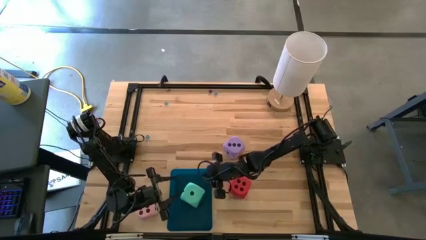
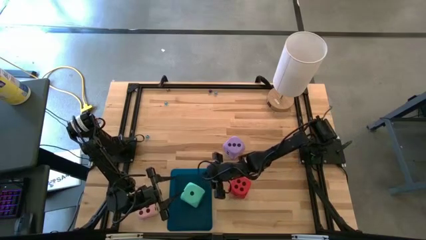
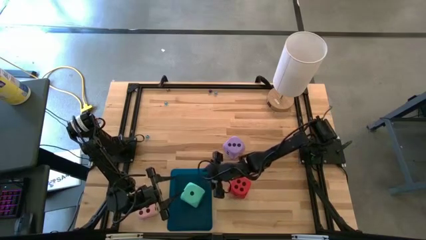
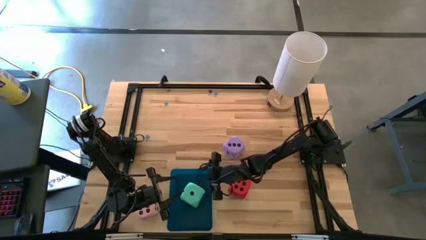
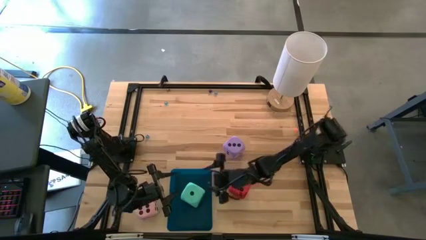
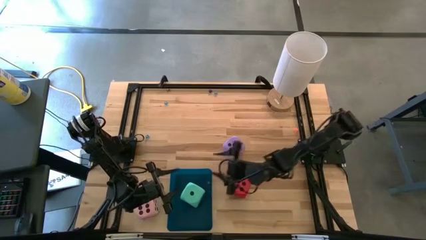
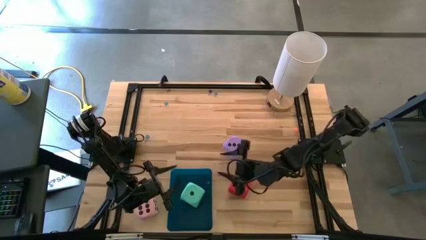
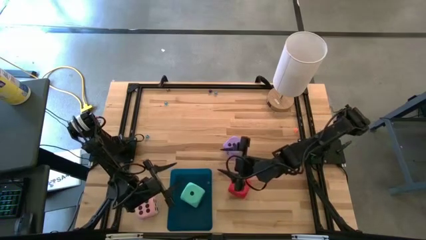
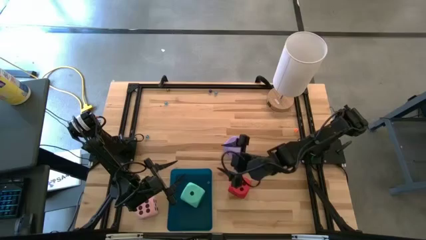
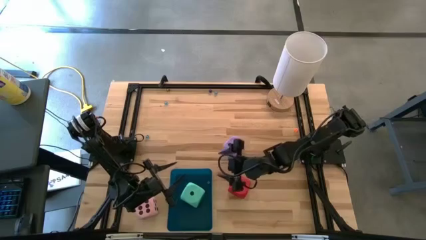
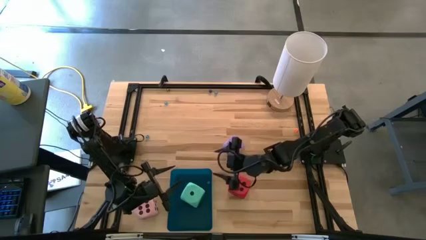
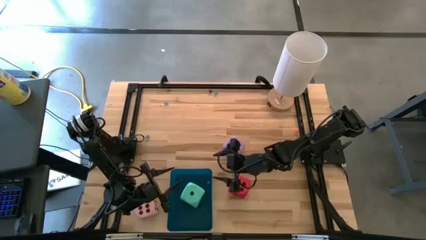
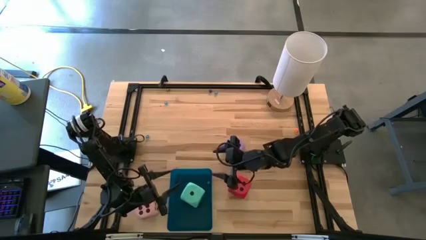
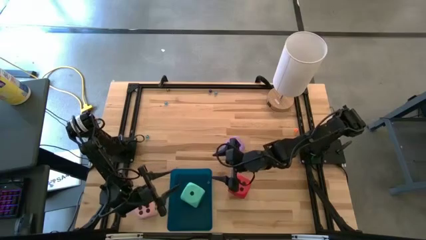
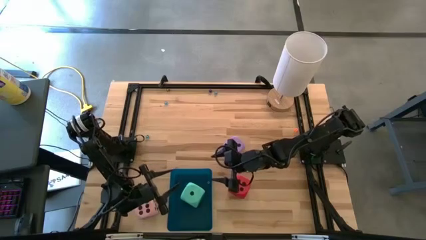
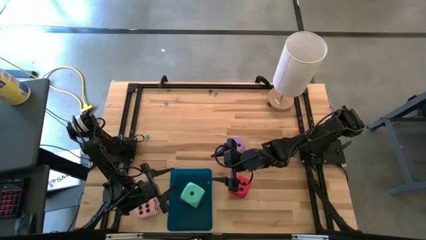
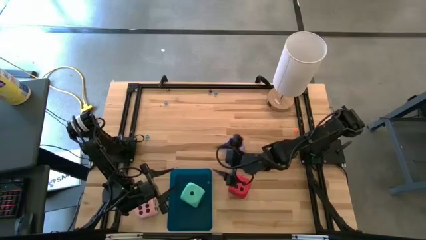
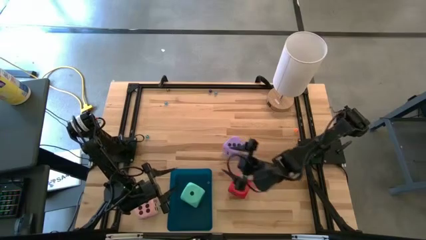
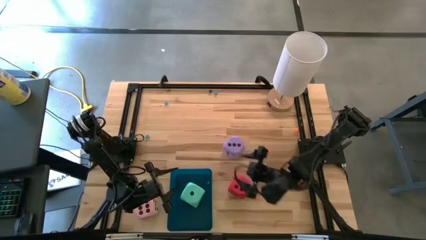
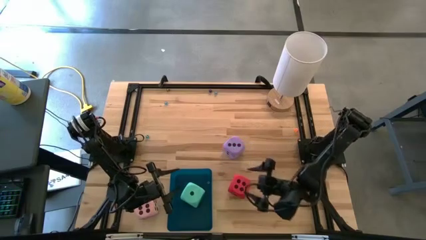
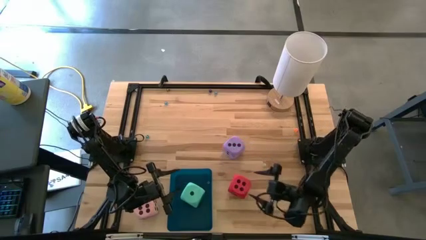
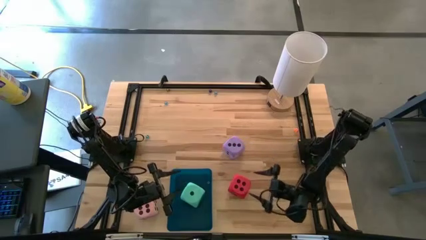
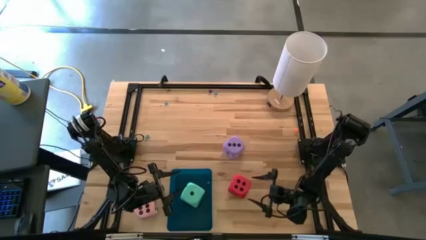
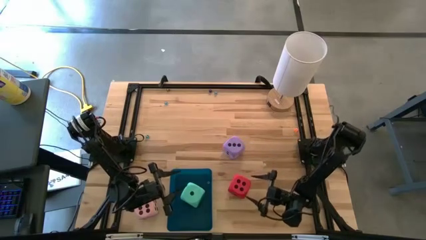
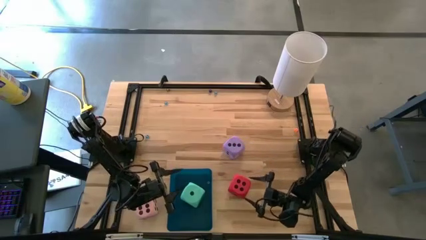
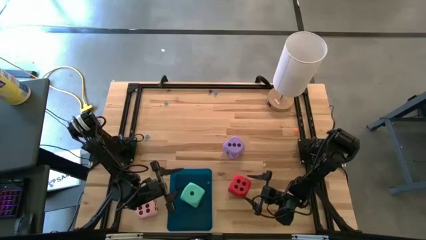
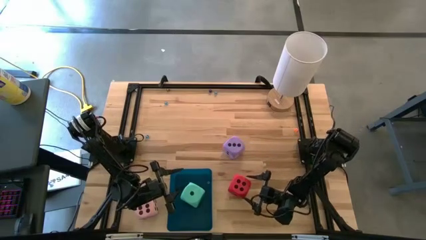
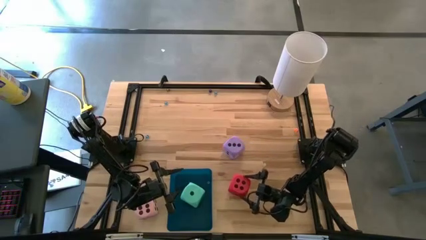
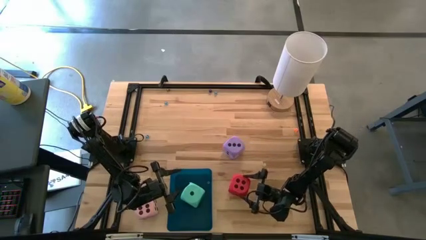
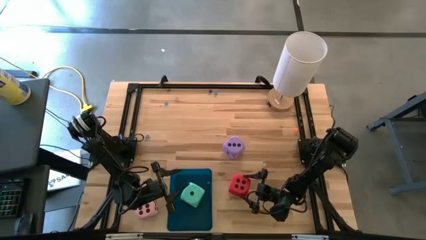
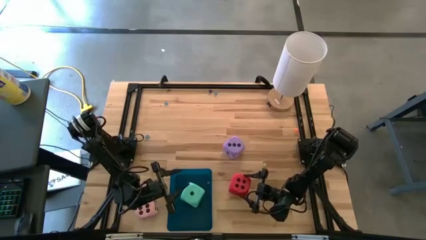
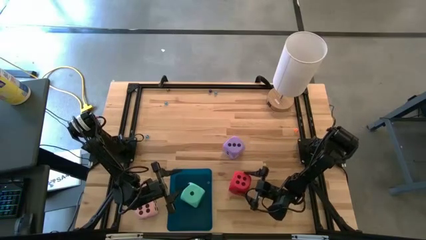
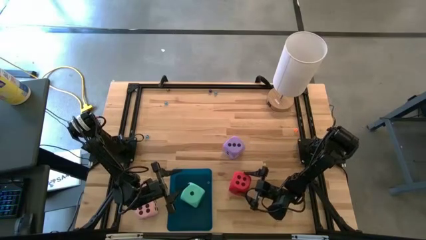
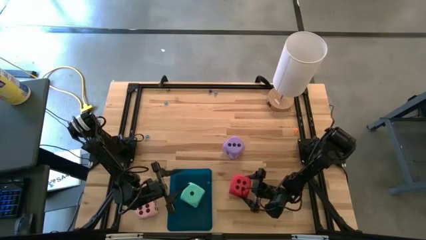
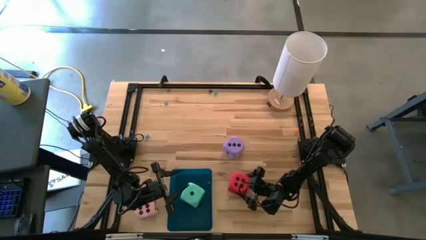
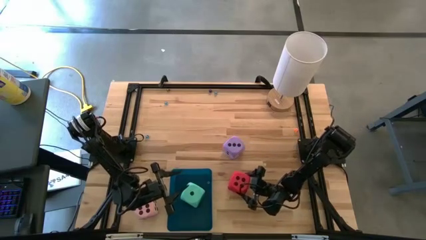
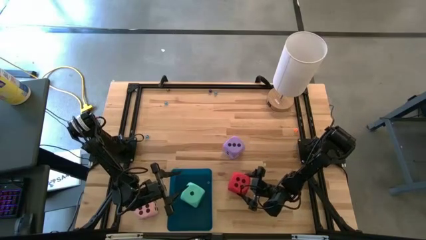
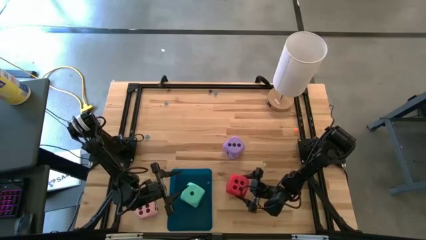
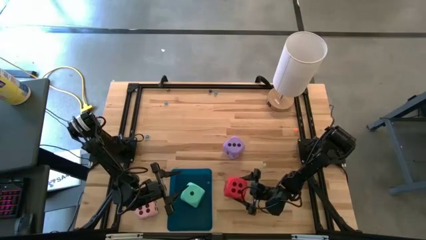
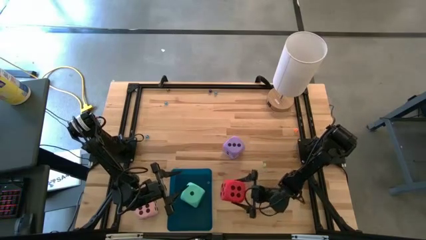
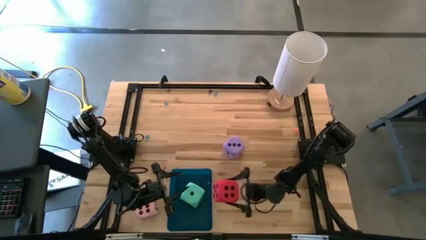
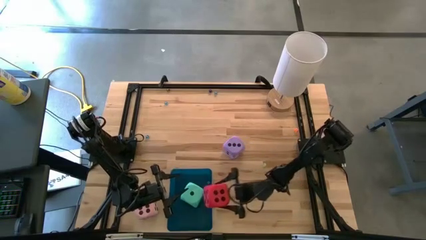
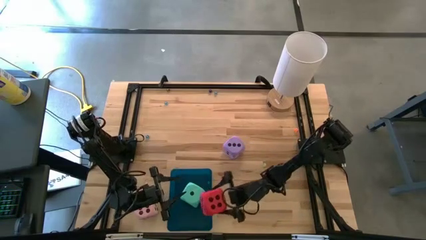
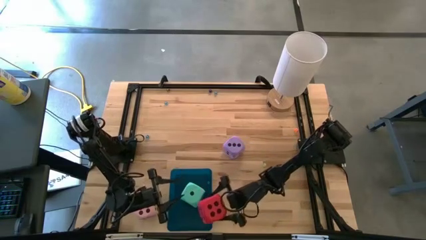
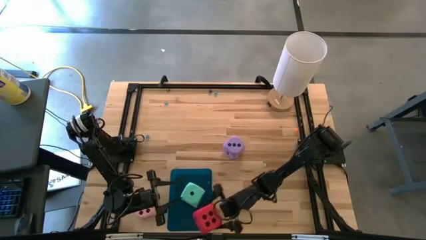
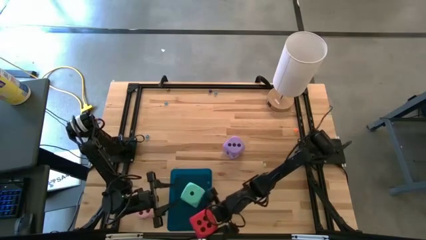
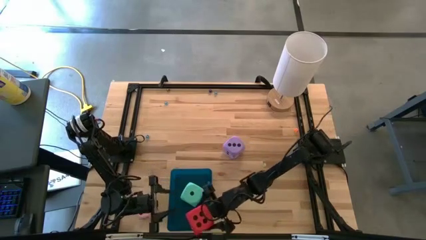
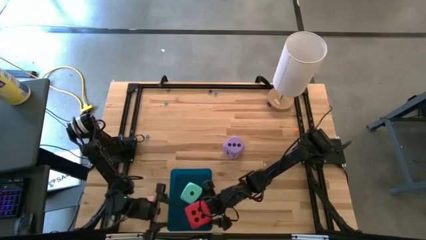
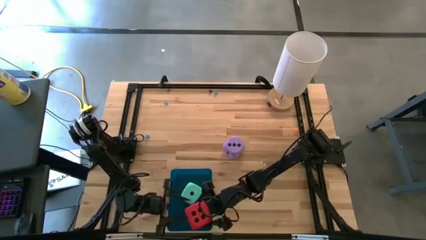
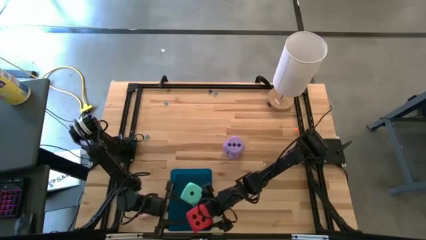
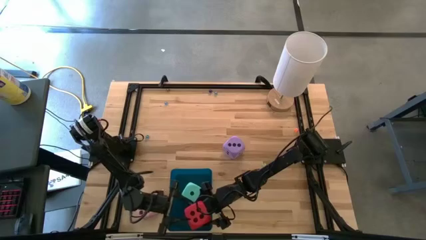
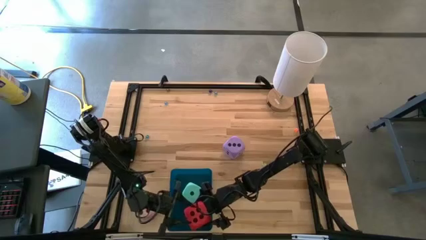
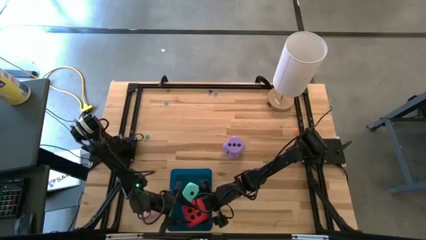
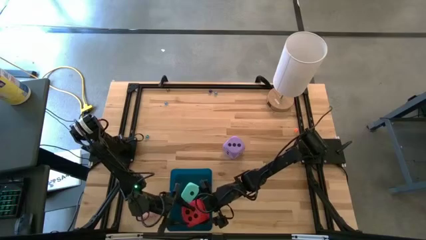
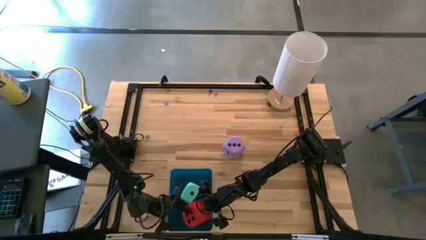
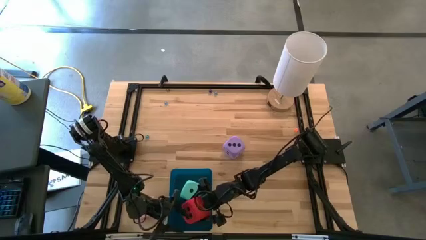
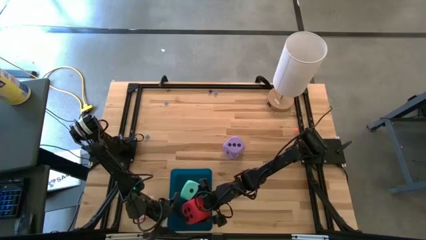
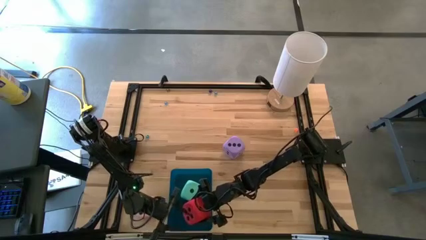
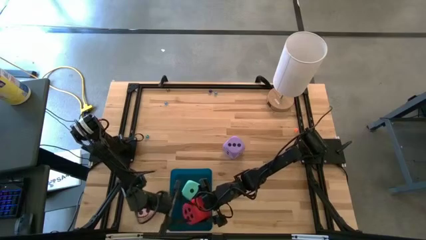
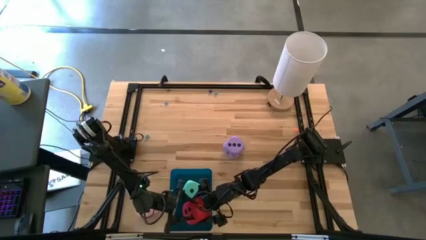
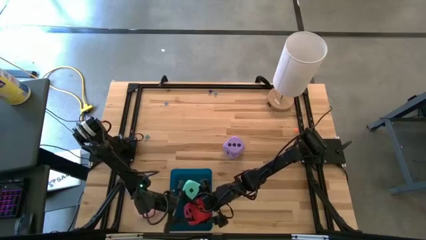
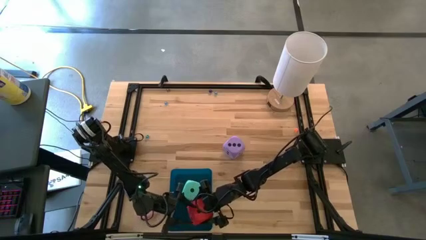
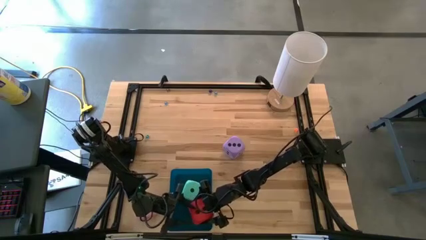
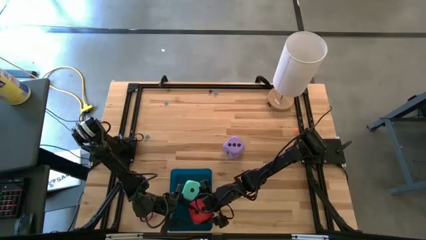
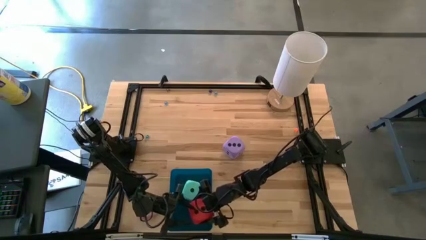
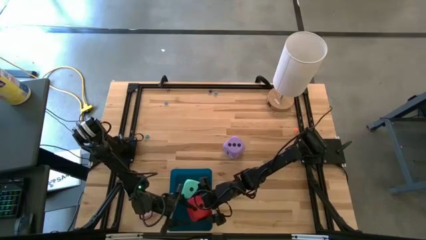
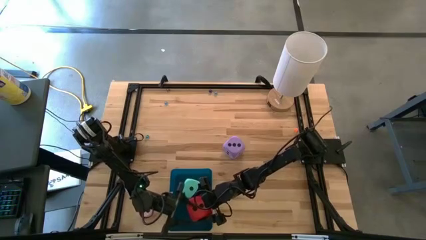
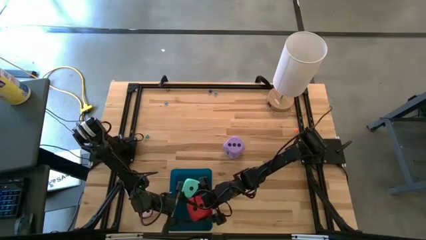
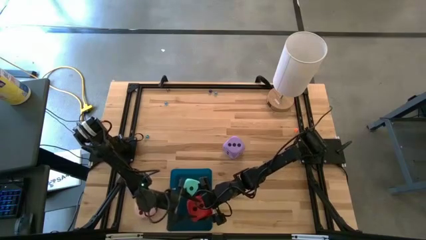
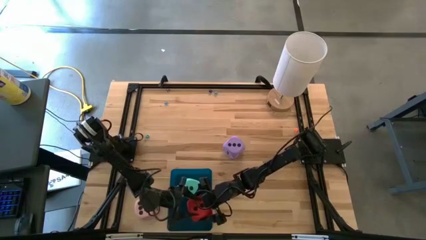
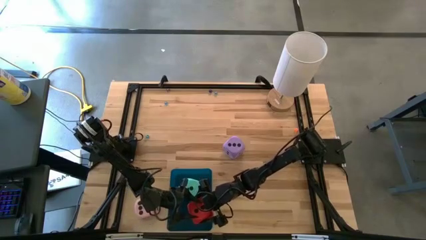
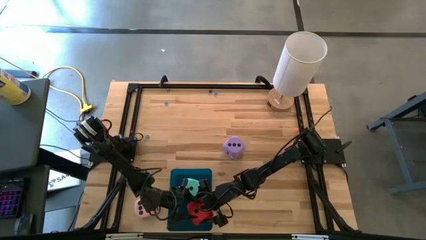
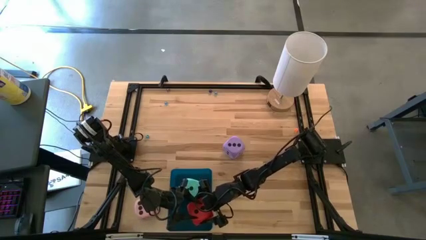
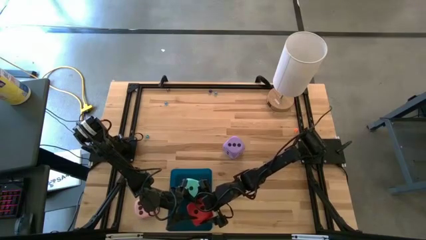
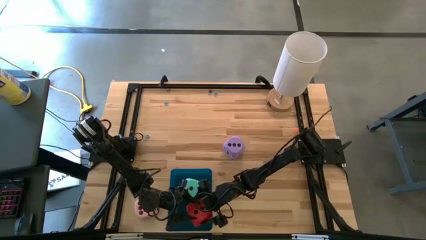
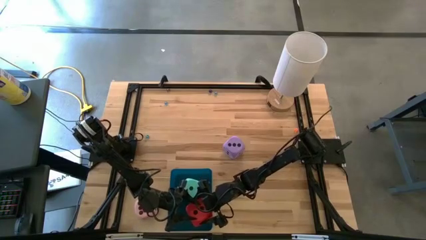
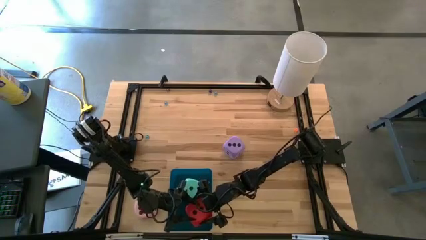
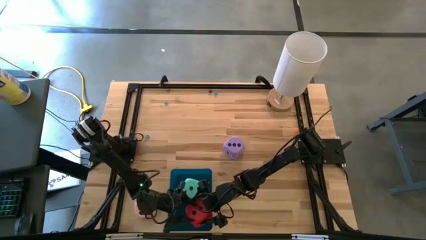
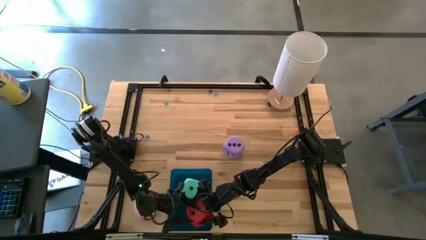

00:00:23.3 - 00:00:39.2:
Task: Pick & Place Dice
Put the big red die into the blue bin
